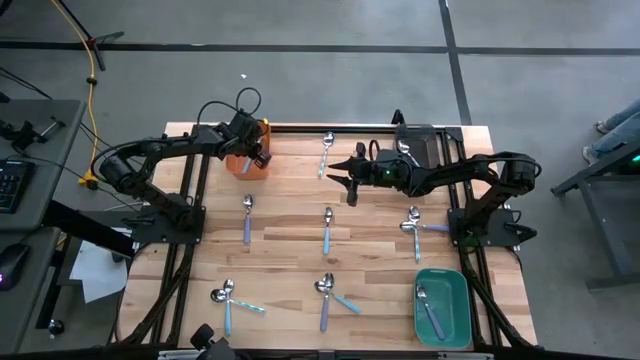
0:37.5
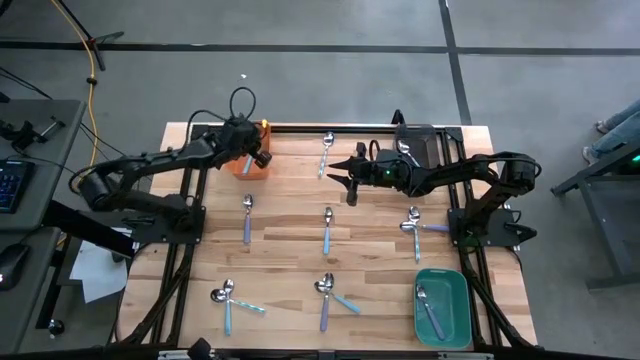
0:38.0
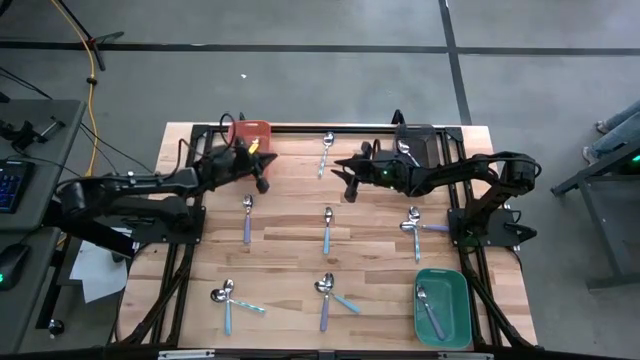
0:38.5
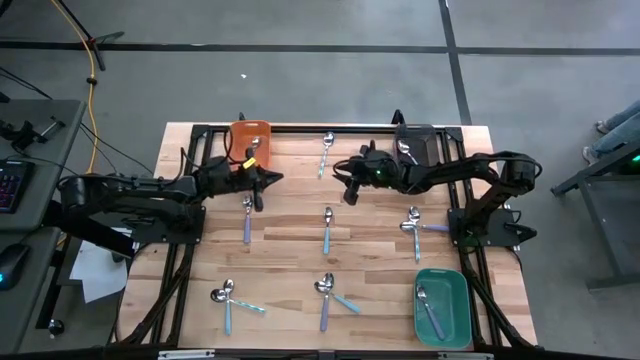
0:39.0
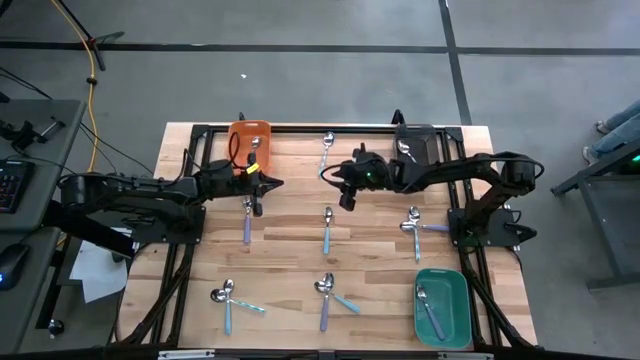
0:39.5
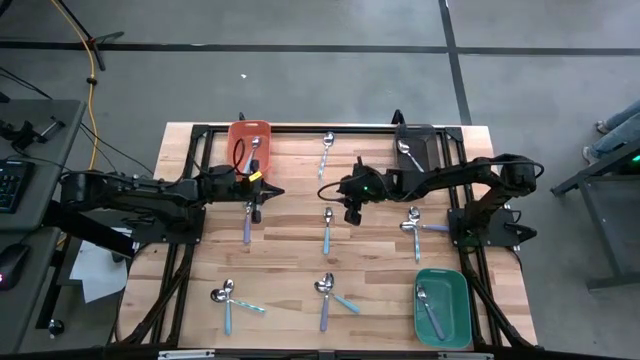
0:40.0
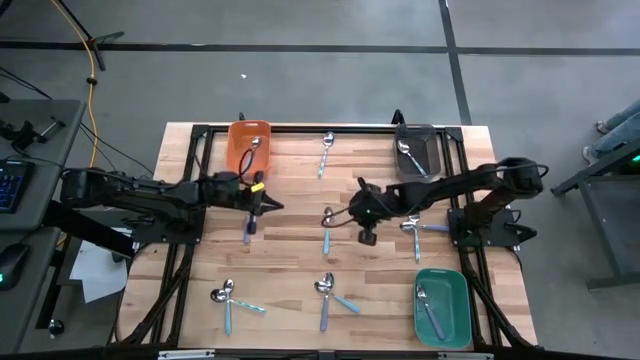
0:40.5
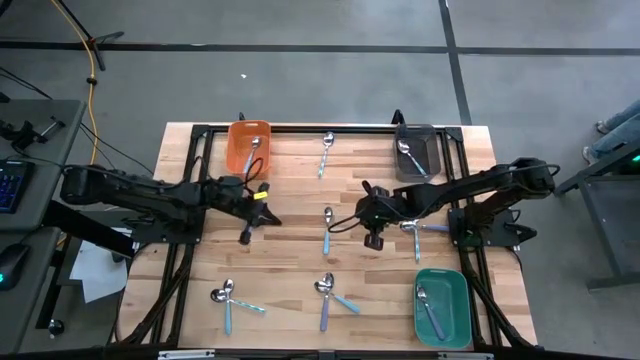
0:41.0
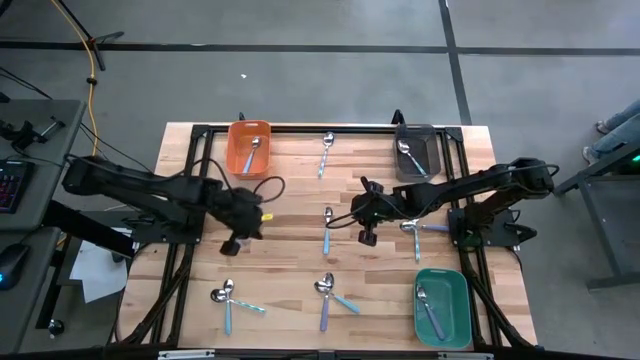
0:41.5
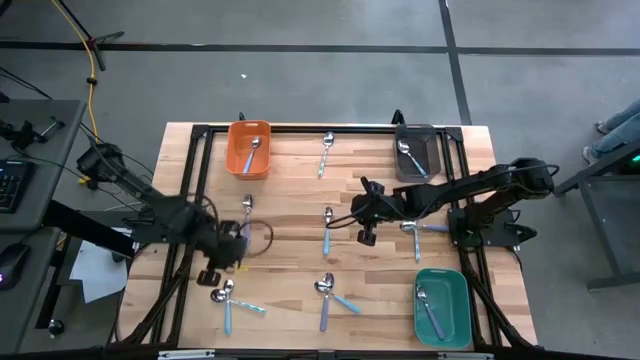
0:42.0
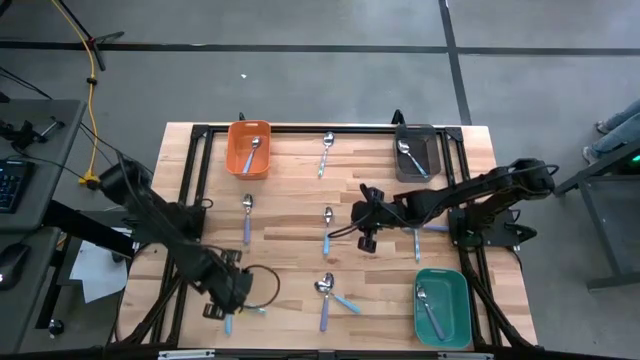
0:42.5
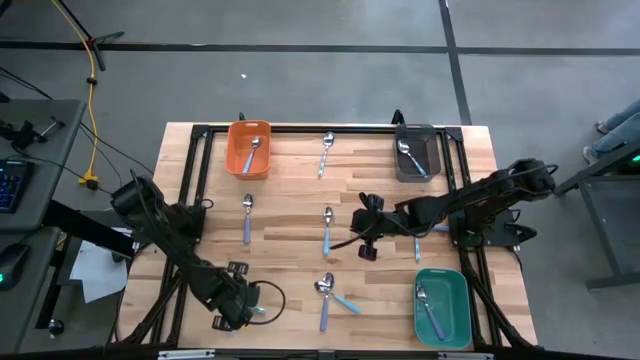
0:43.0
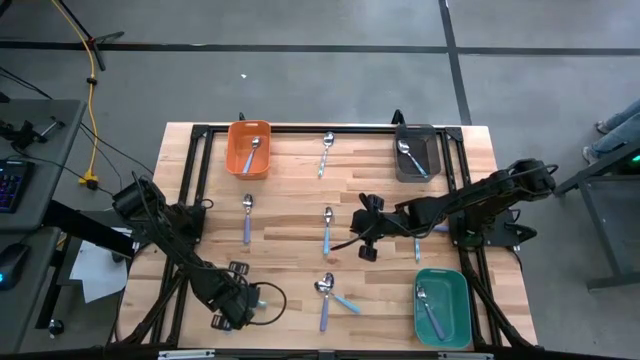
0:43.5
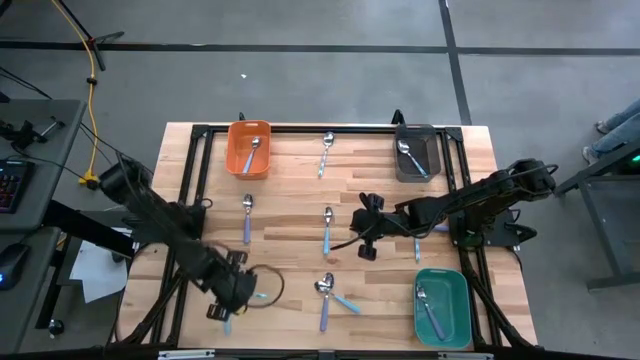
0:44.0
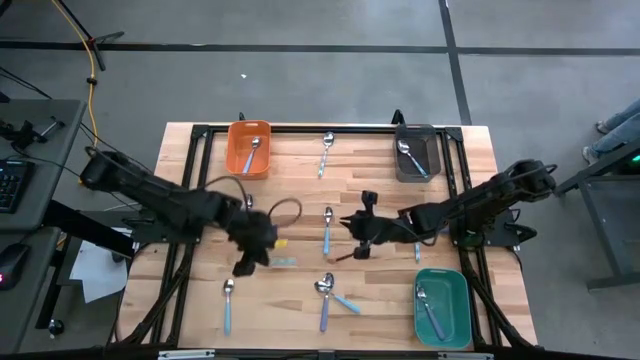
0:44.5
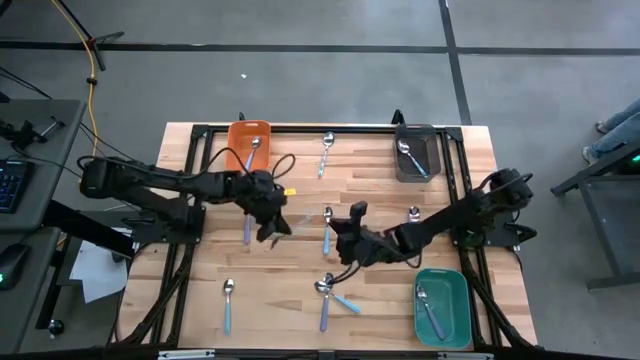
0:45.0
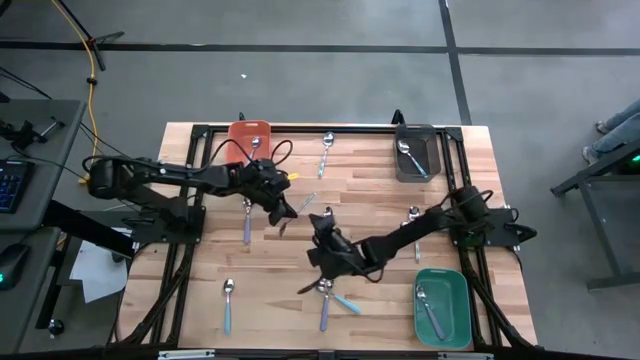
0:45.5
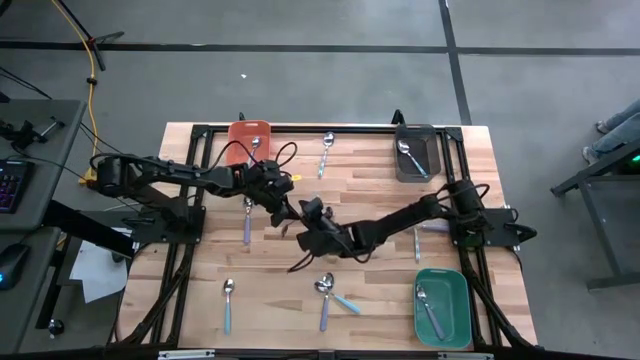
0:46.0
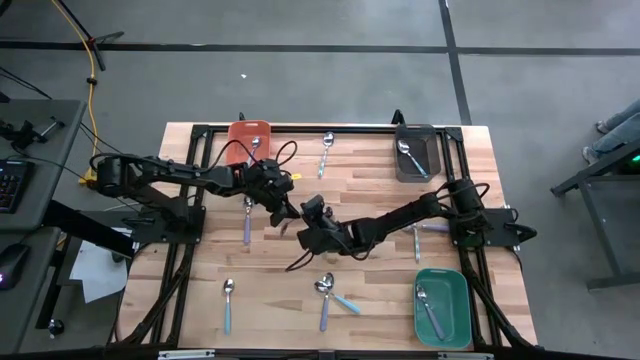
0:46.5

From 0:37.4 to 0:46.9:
Task: Sort silverware by color (type)
Put the white patterned spoon into the black bin

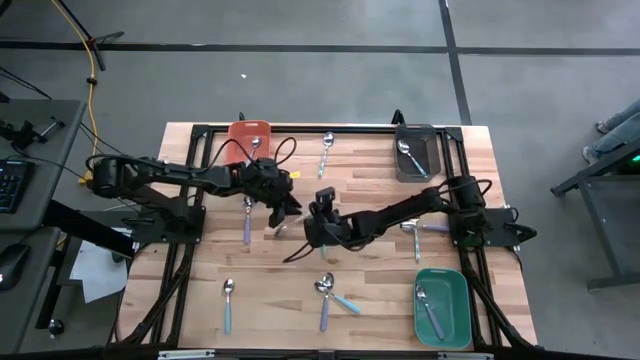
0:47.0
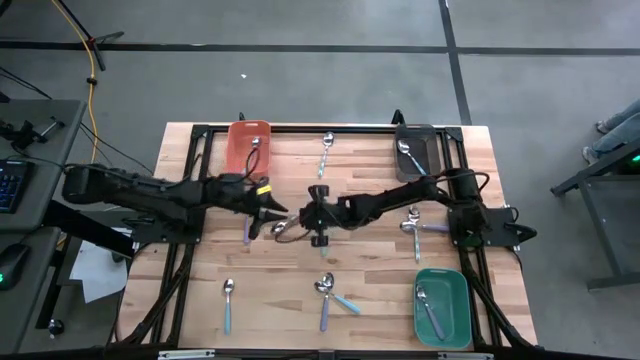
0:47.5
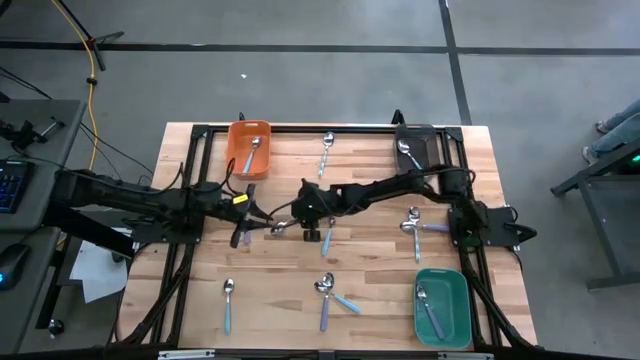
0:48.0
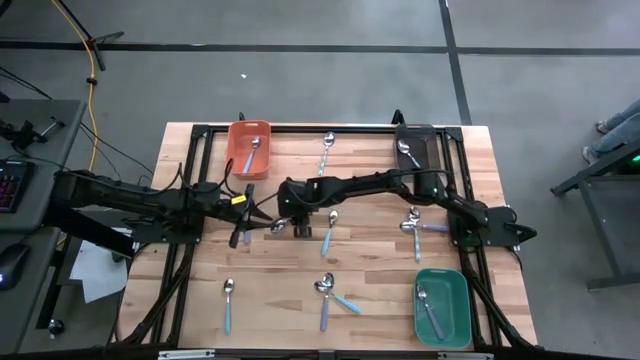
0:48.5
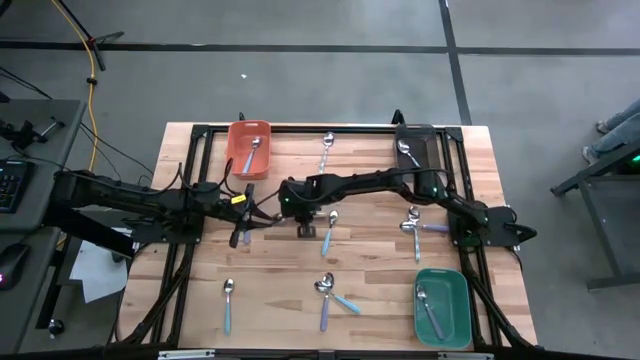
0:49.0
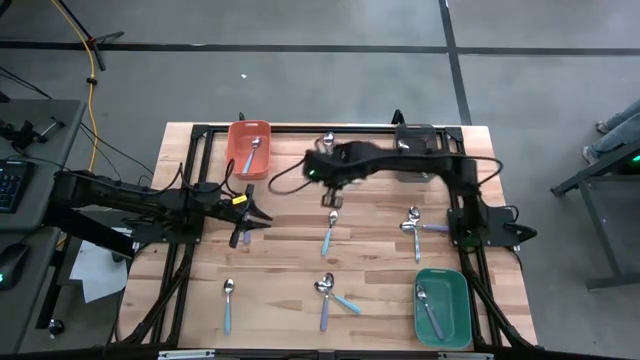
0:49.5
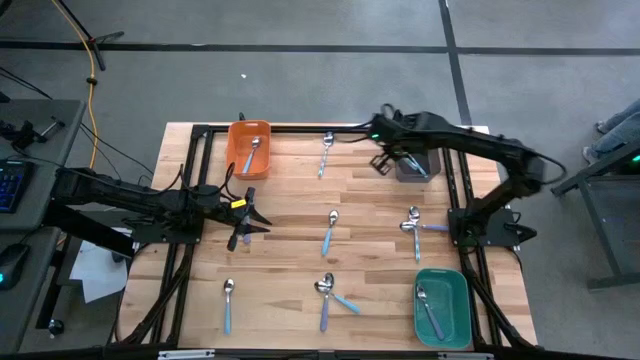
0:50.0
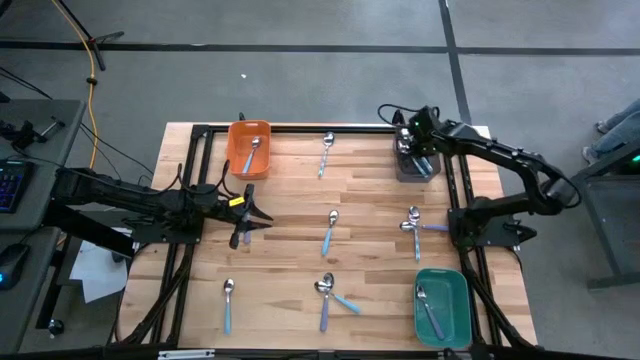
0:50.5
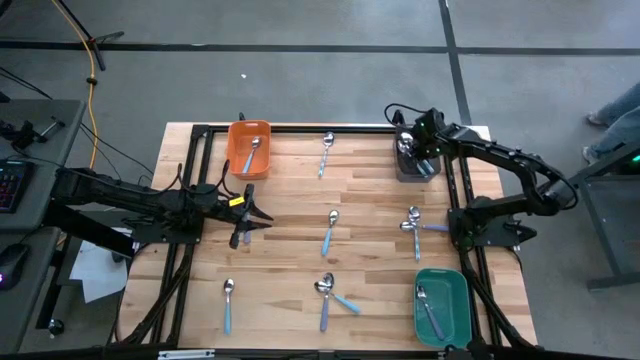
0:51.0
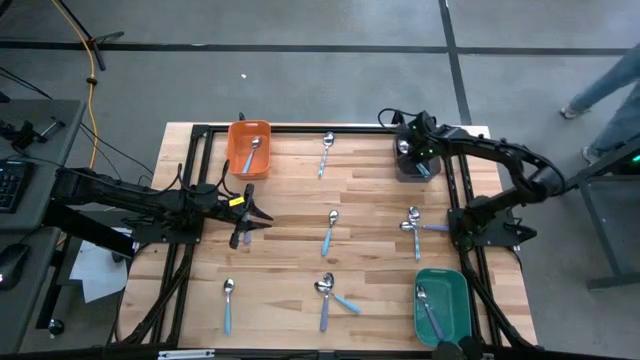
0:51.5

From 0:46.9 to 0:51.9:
Put the white patterned spoon into the black bin

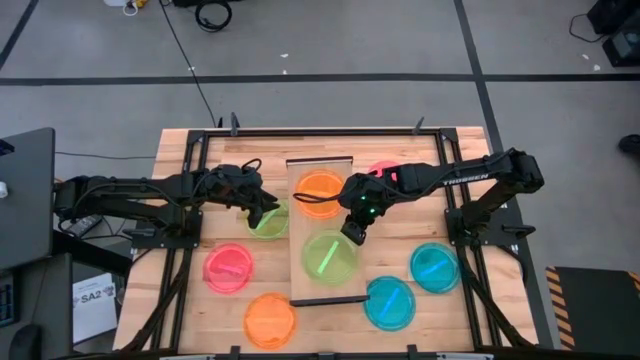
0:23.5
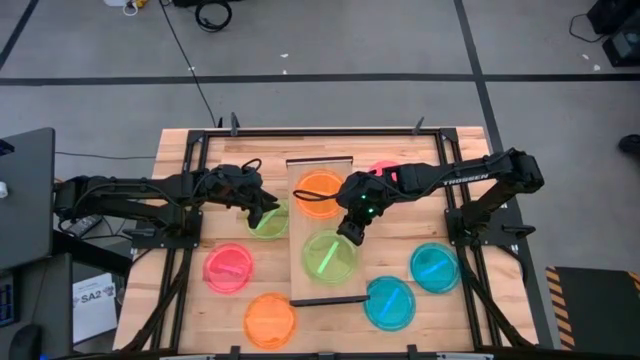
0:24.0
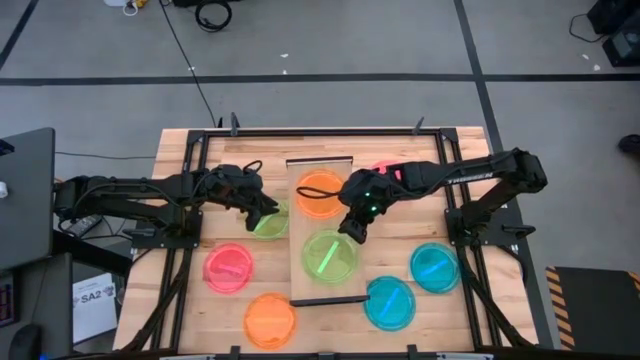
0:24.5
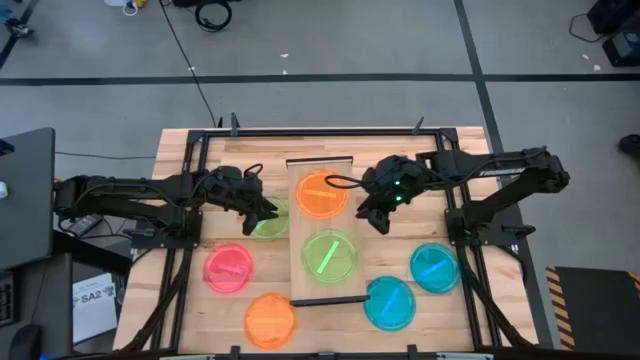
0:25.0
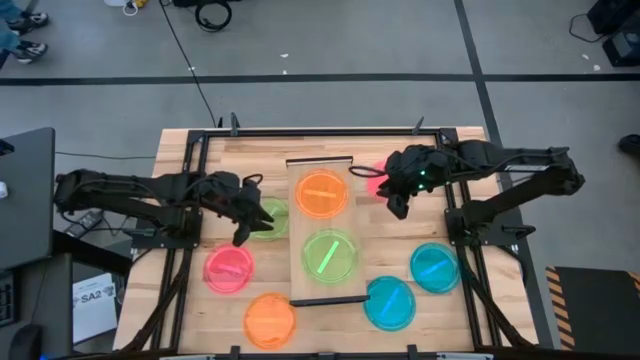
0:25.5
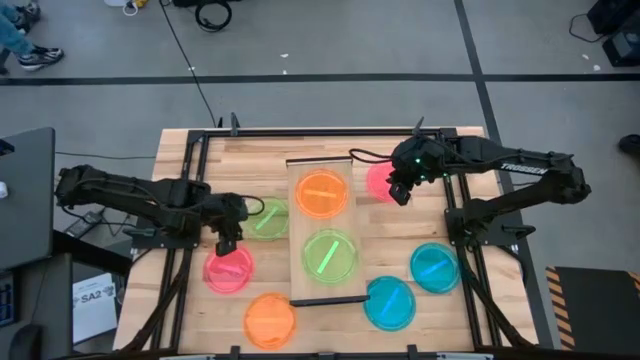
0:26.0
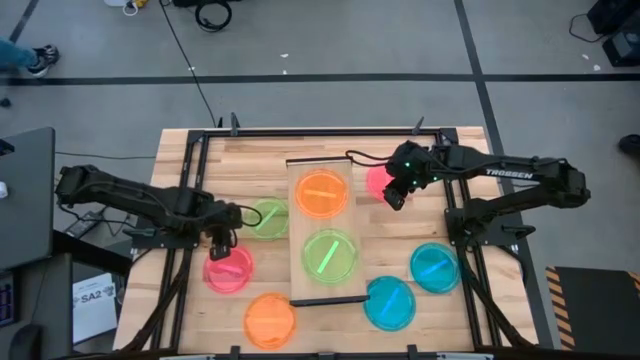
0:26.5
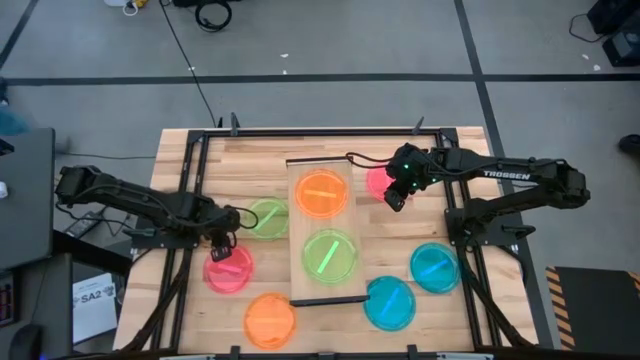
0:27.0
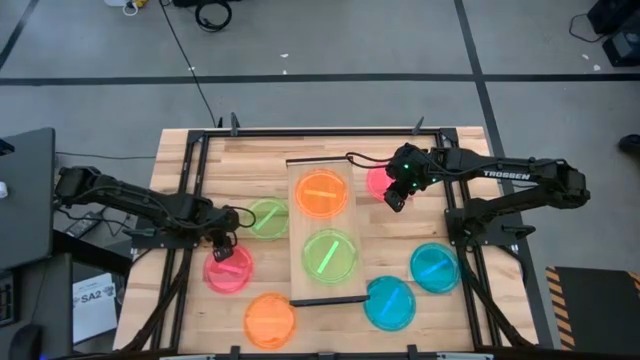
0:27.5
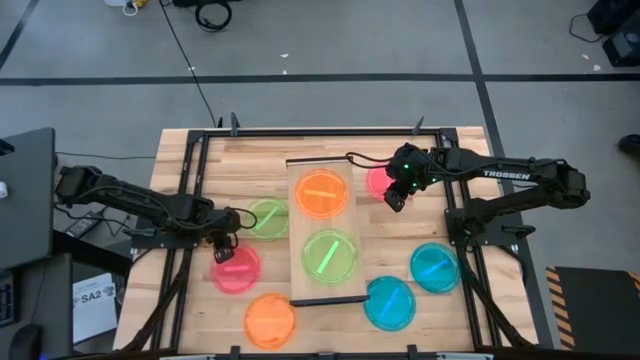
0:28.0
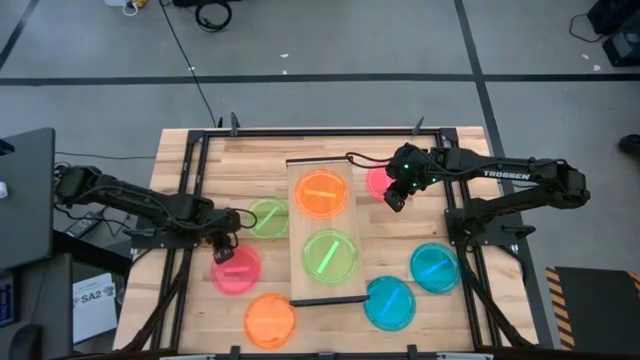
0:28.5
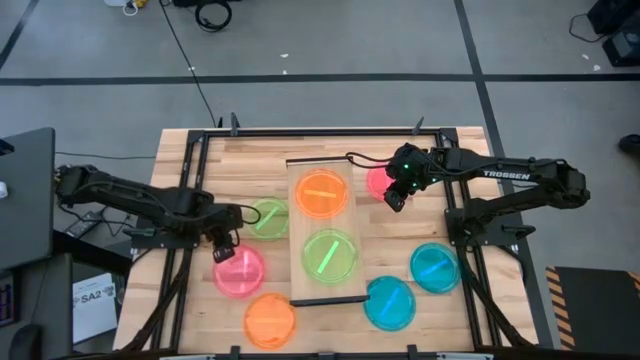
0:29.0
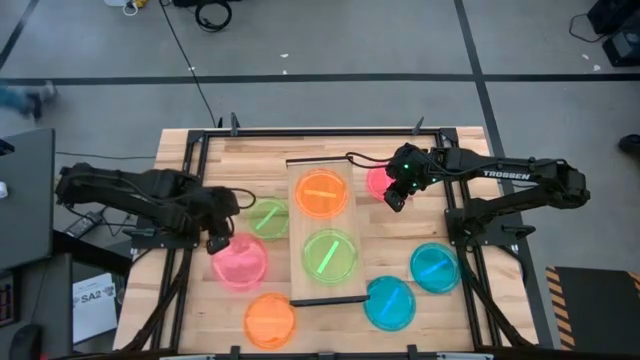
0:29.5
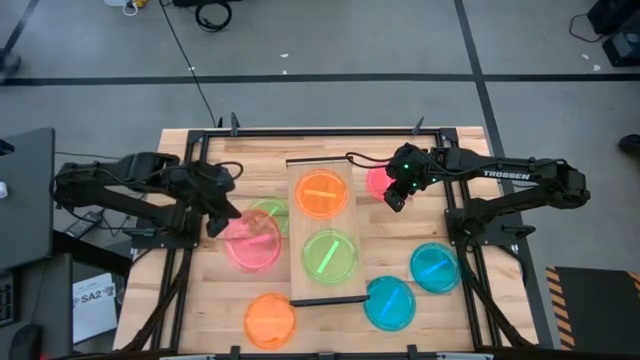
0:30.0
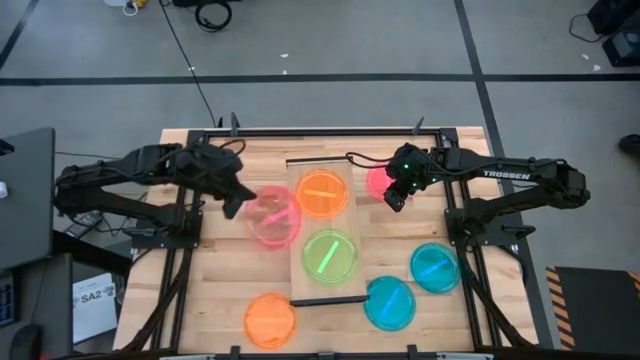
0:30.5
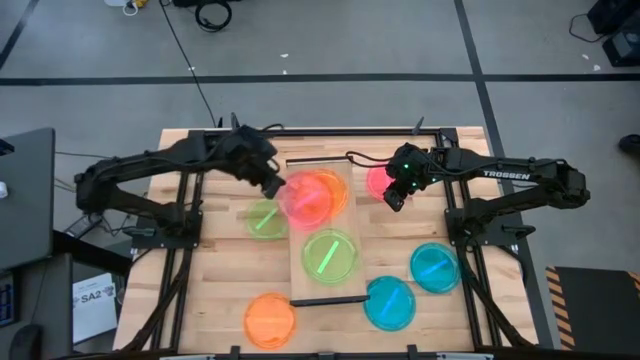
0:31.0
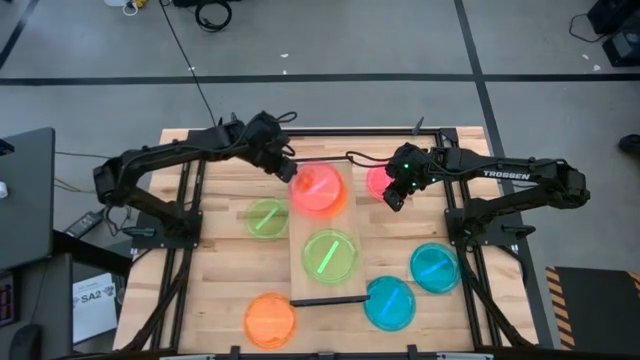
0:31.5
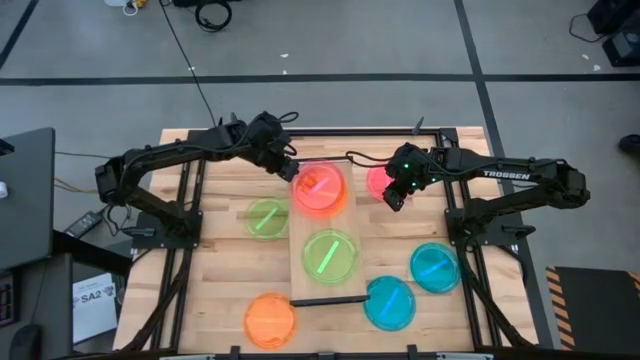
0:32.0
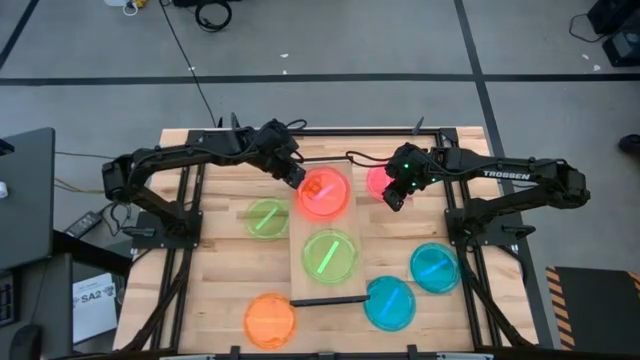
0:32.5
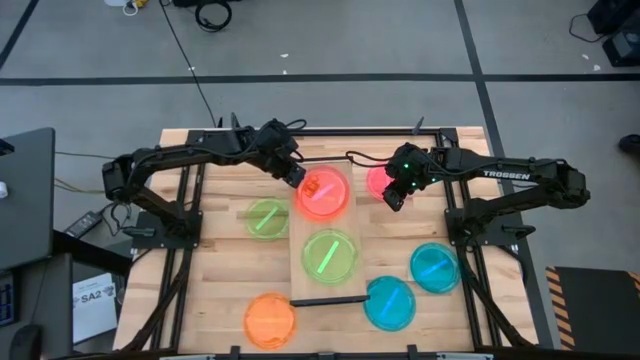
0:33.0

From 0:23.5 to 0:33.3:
Task: Place and stack plates onto a shelf
Stack the bottom pink plate on top of the orange plate on the shelf
